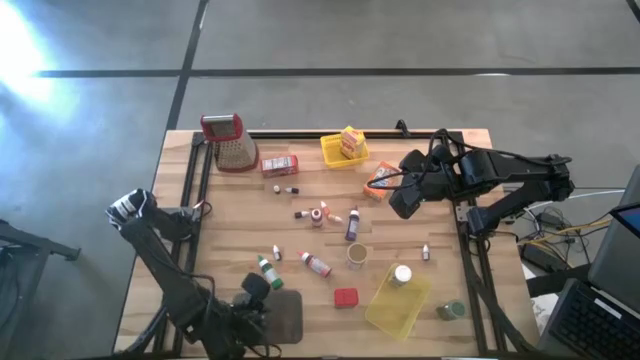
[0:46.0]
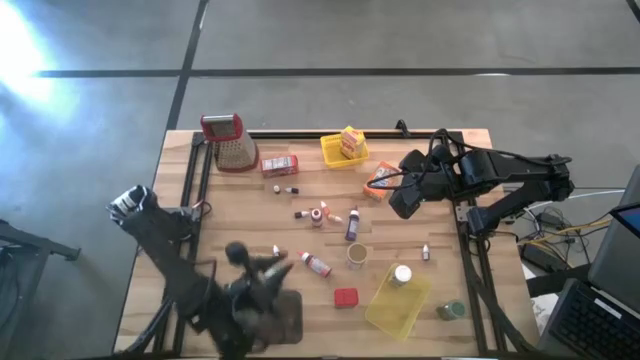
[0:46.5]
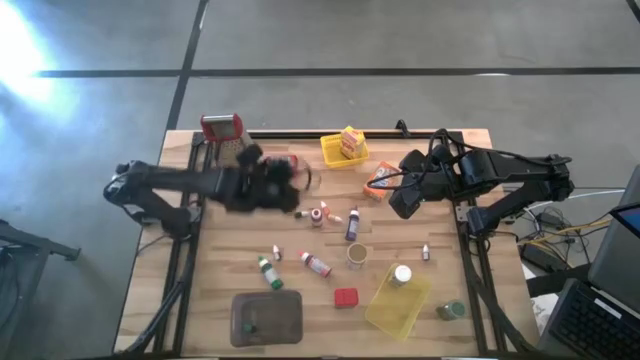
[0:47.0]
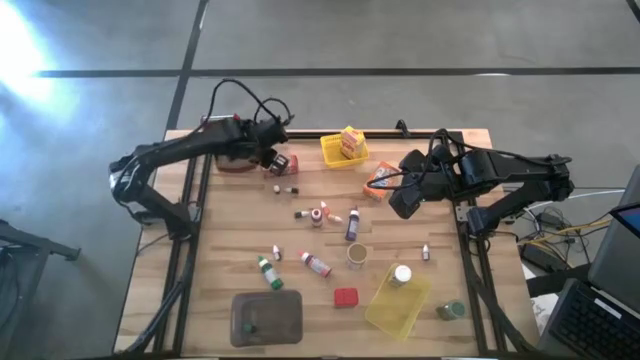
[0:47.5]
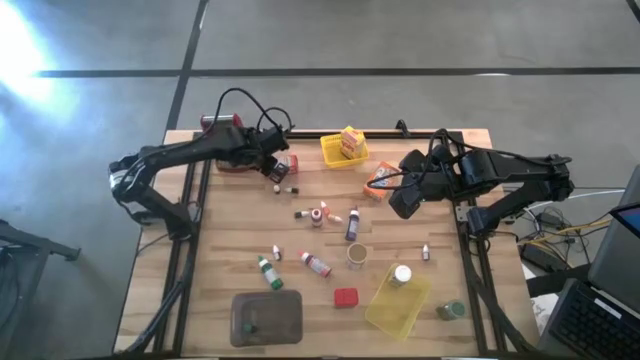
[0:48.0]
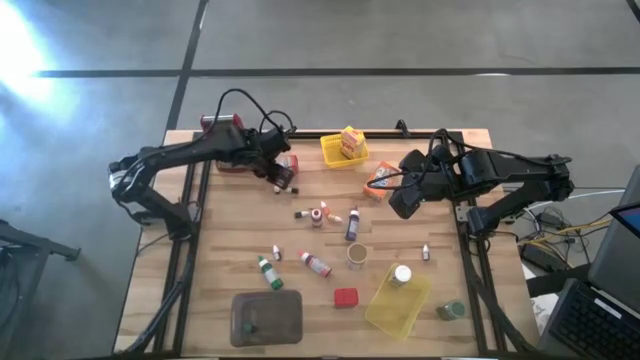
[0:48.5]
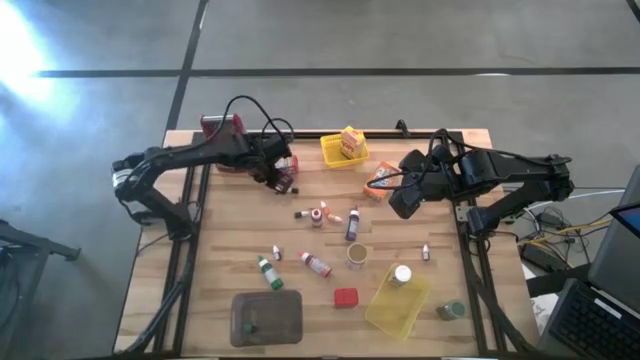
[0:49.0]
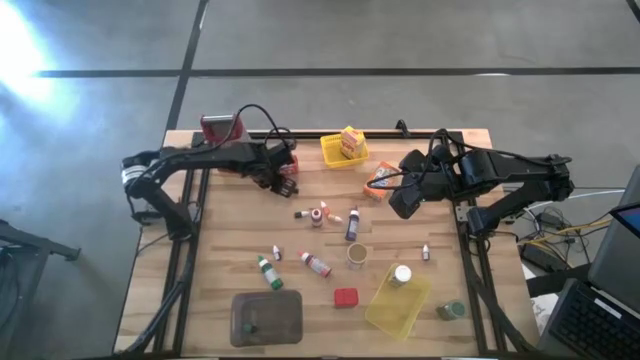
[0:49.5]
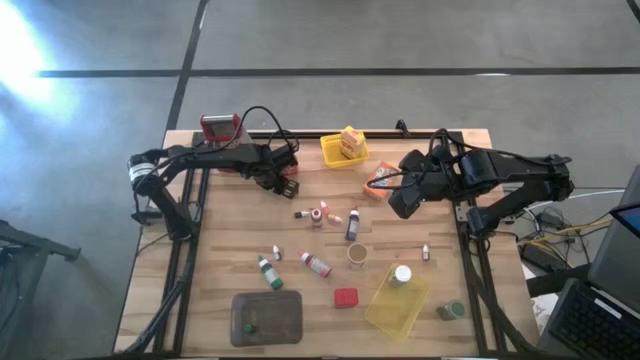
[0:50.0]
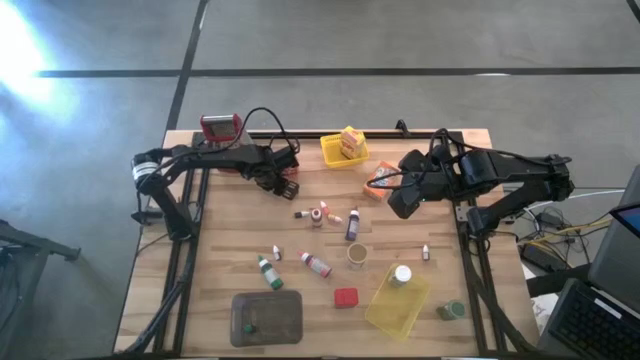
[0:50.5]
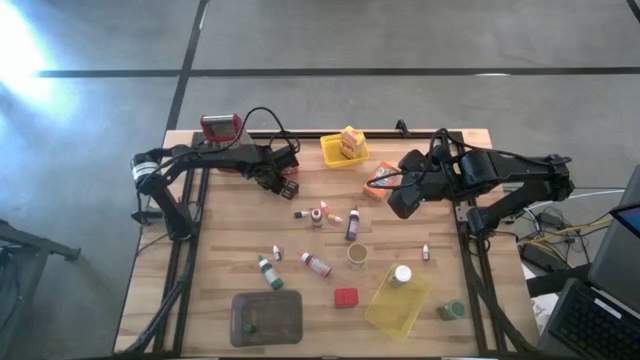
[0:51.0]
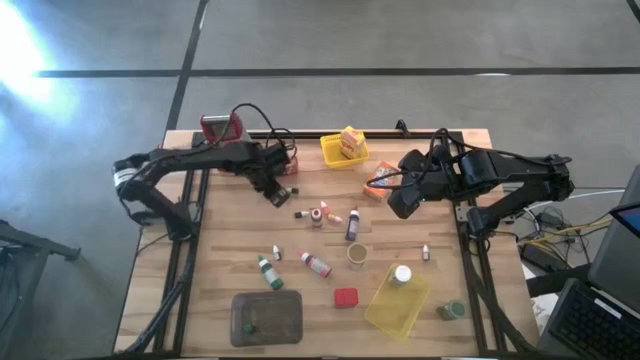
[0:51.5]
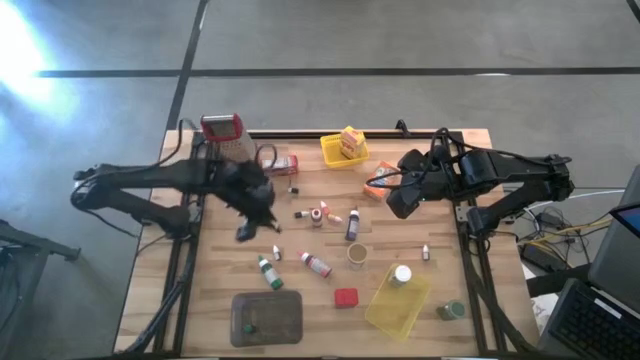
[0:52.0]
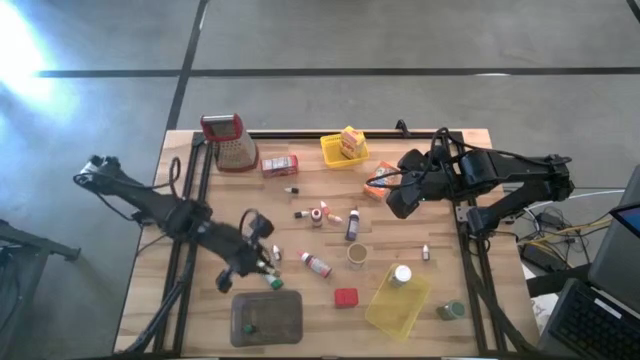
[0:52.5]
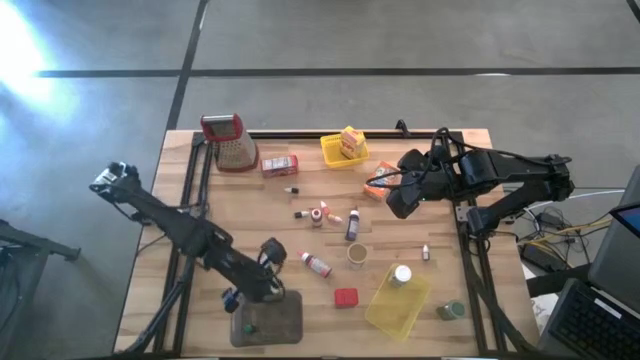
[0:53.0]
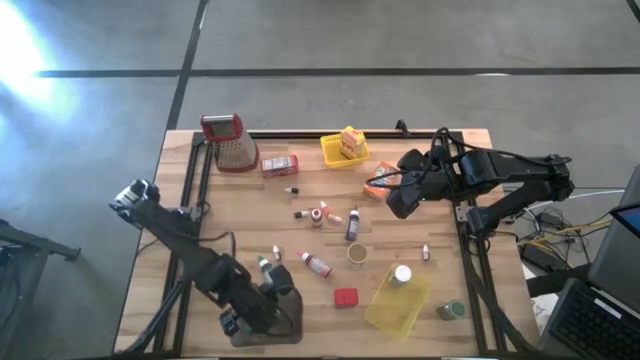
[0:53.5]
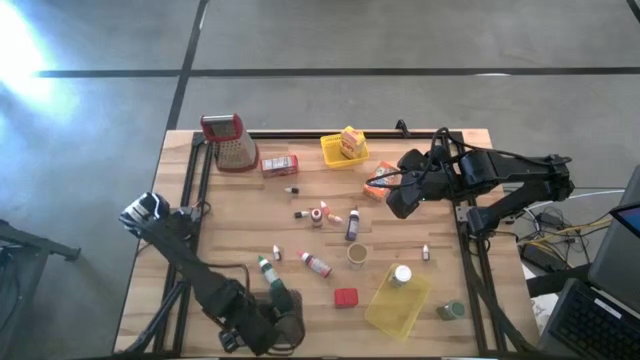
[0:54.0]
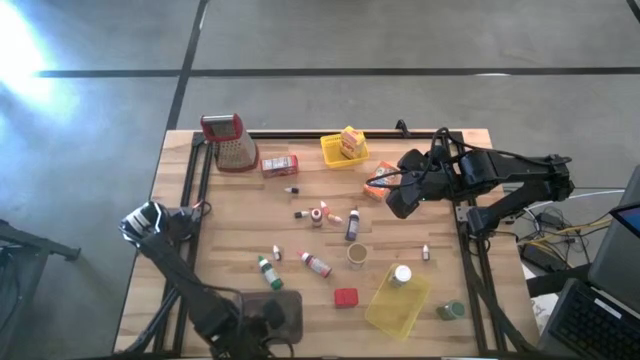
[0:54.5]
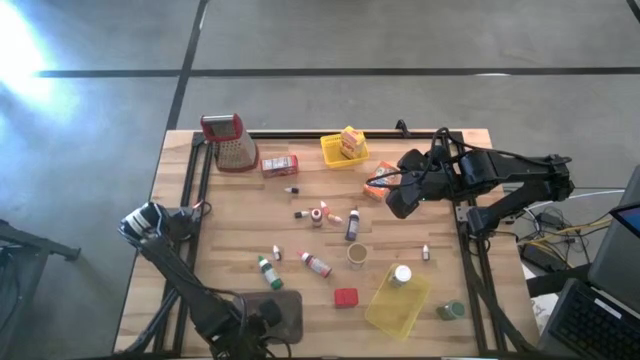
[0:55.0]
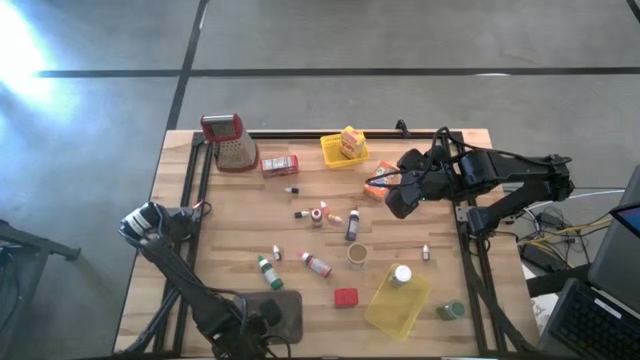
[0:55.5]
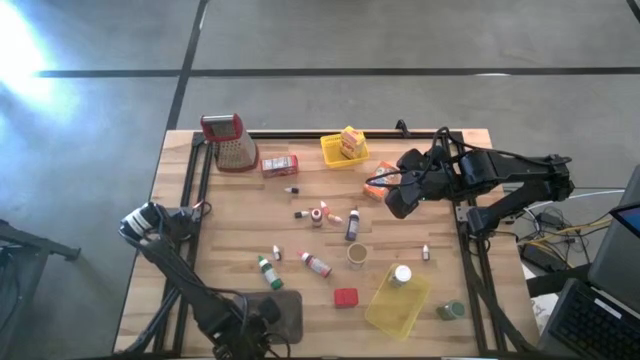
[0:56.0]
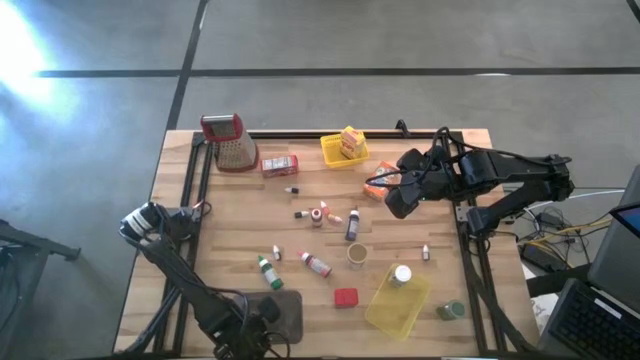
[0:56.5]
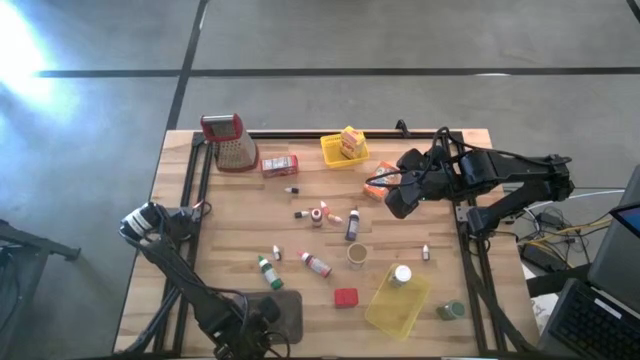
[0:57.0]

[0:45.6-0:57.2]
Task: Pick & Place Kitchen Items
Put the light green food coloring bottle into the black bin

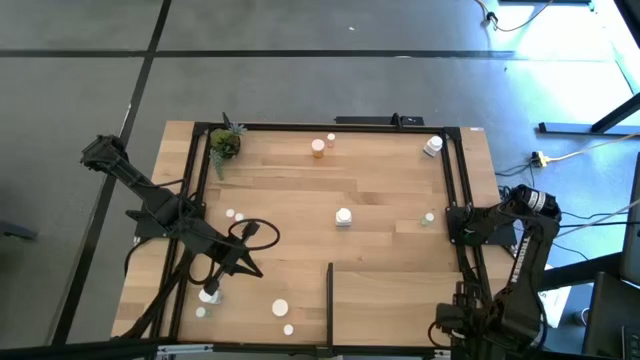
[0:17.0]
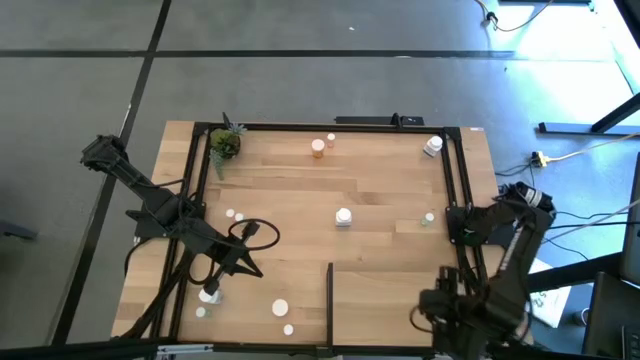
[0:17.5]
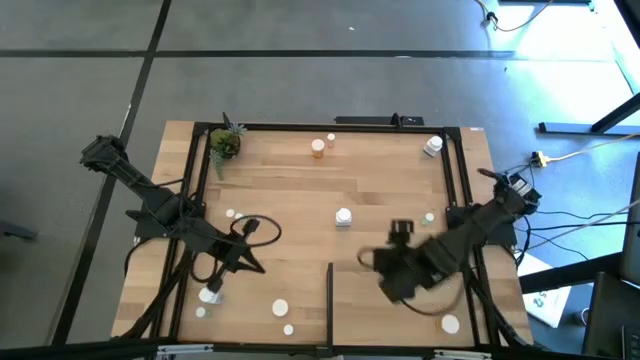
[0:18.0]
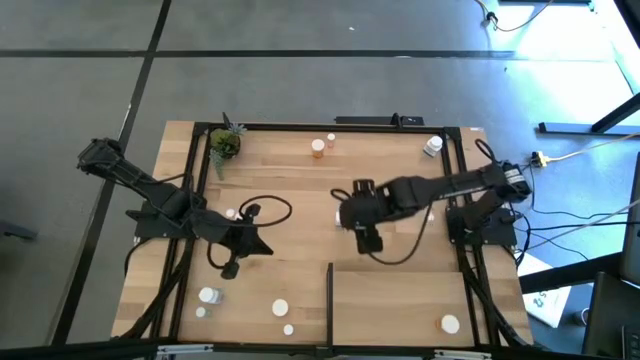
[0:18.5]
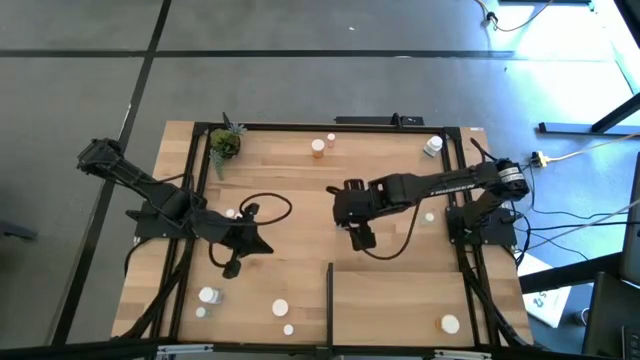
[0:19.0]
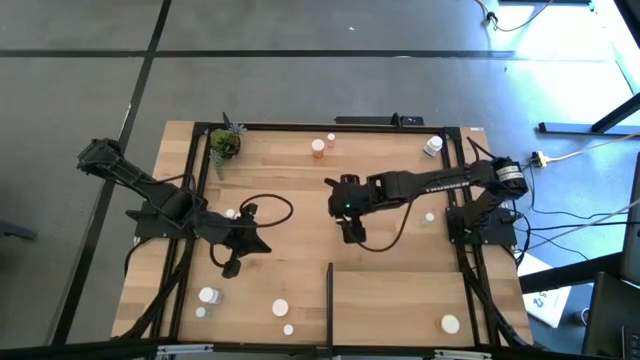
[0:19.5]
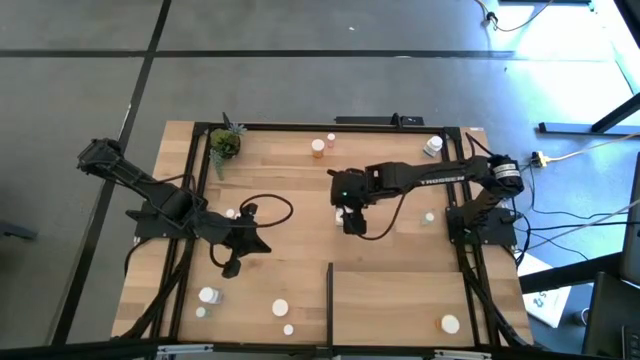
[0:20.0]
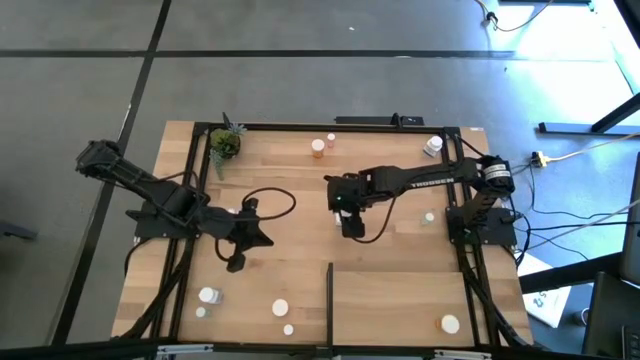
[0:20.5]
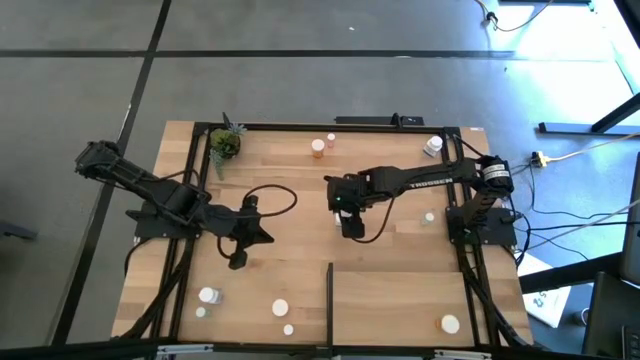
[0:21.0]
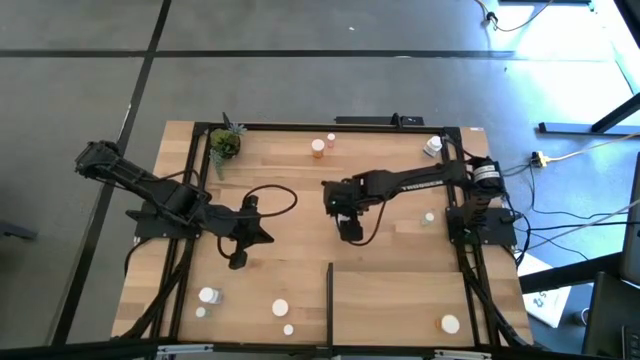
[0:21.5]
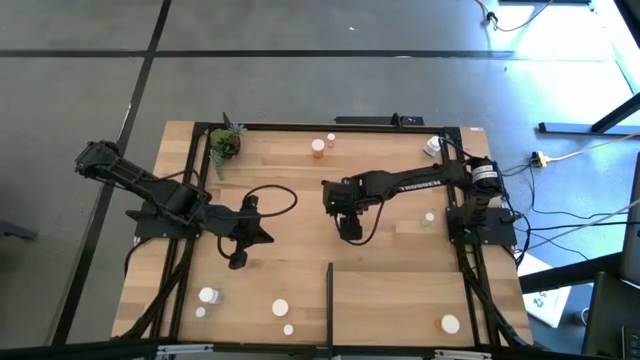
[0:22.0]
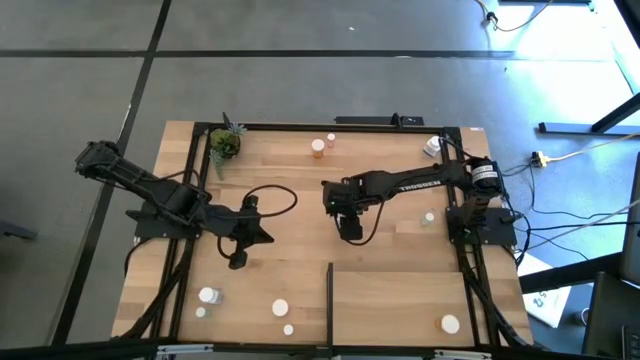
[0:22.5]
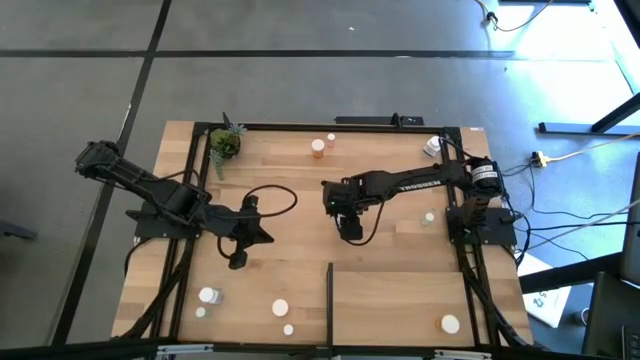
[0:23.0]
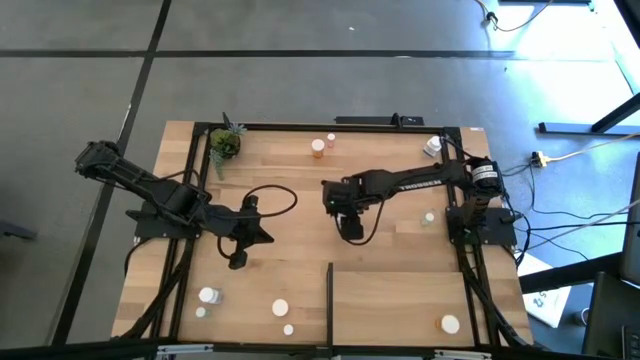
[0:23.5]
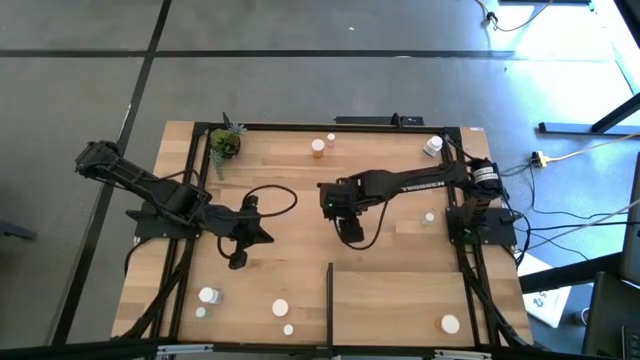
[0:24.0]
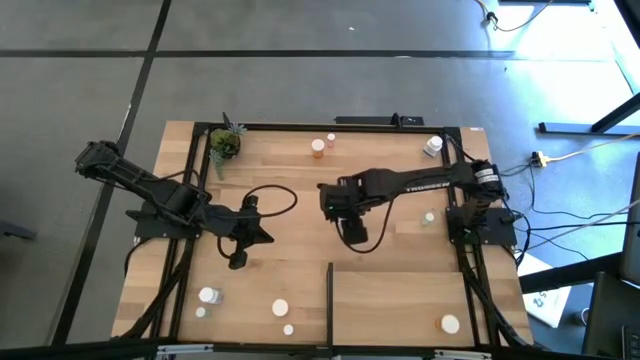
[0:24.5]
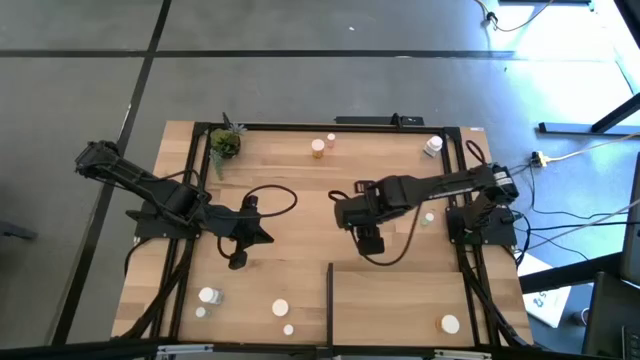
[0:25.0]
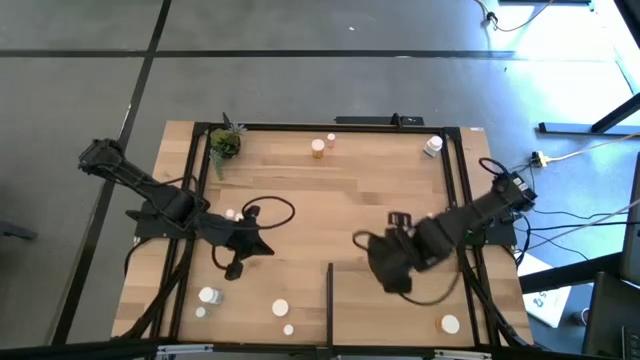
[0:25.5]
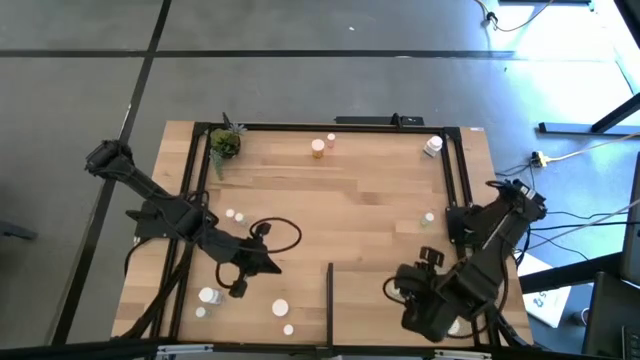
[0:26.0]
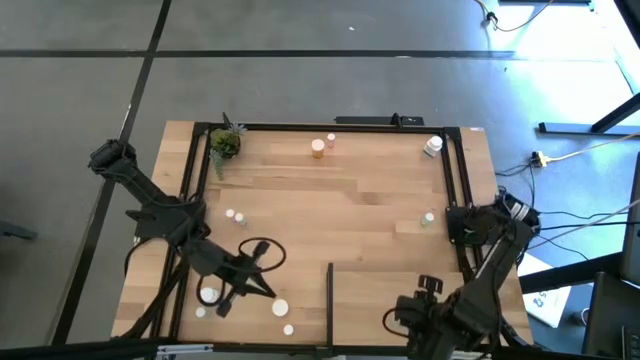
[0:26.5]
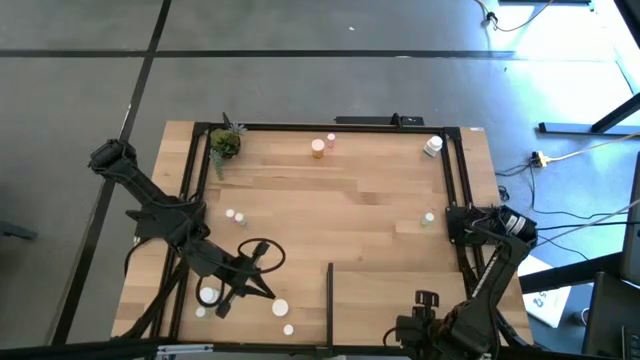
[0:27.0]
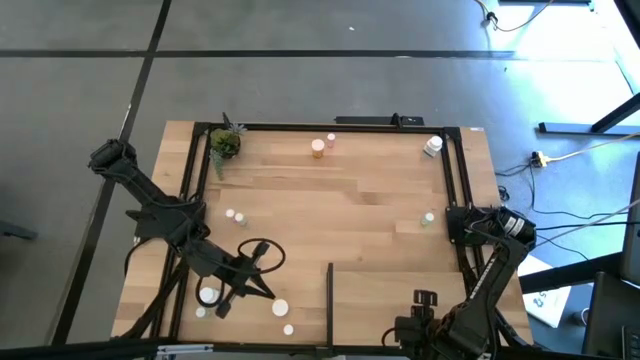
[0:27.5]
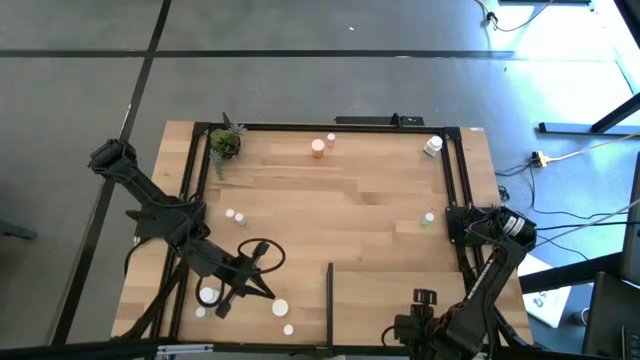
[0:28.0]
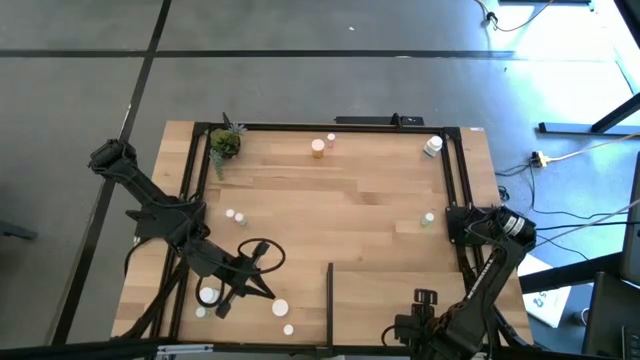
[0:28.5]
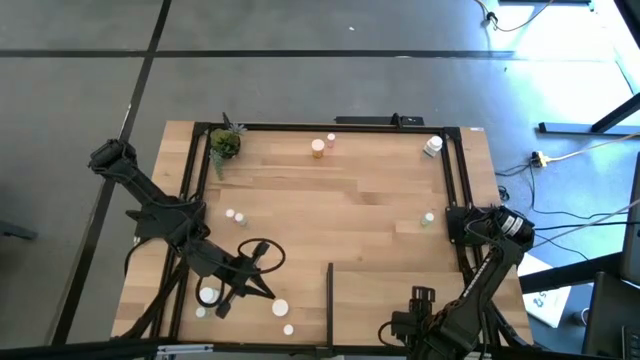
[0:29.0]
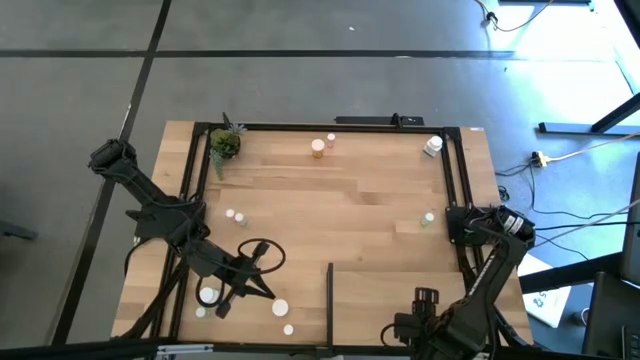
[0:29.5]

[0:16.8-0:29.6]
Task: Pick and place medicine bottles onto shelf by color
Put the middle white pill bottle on the shelf
